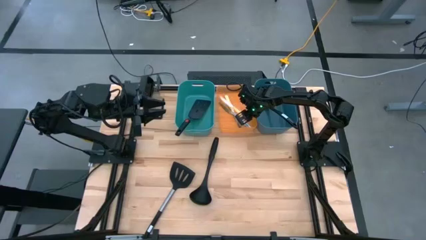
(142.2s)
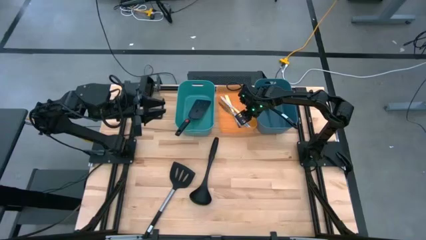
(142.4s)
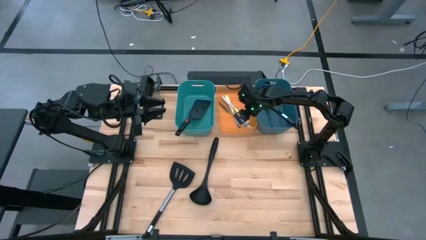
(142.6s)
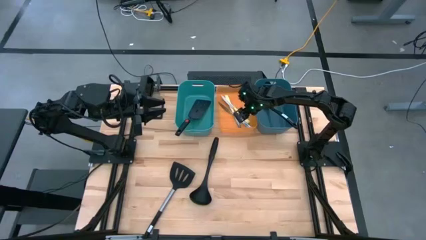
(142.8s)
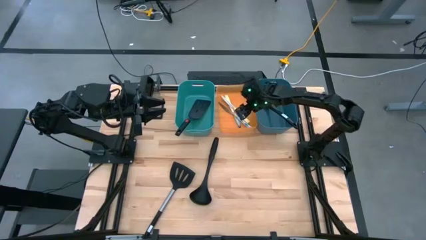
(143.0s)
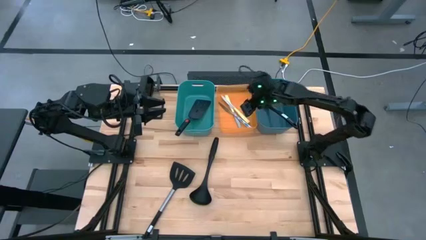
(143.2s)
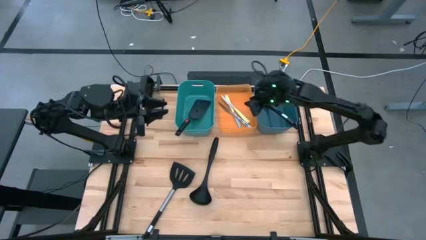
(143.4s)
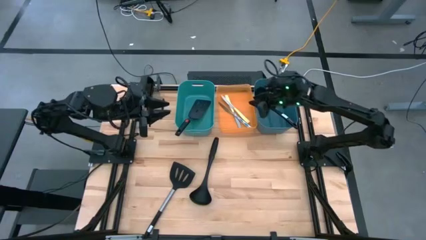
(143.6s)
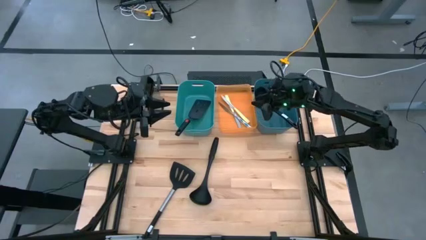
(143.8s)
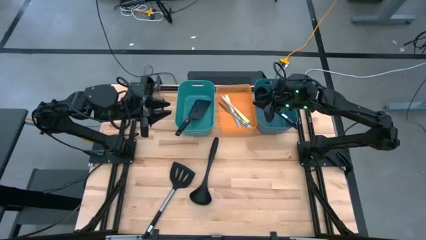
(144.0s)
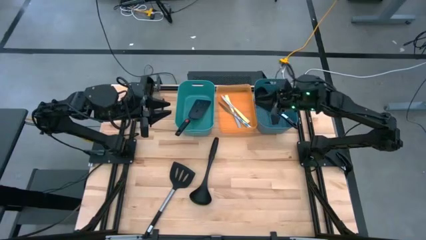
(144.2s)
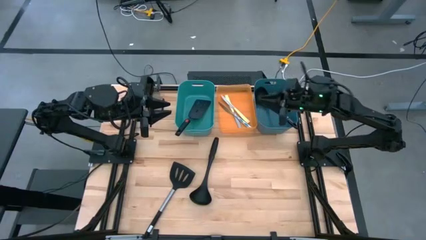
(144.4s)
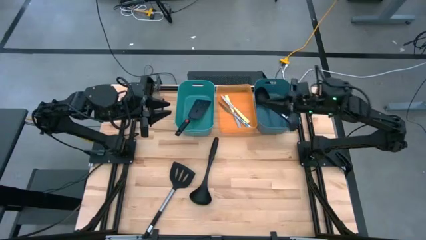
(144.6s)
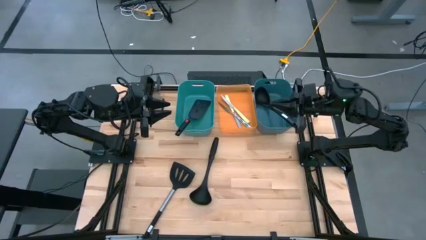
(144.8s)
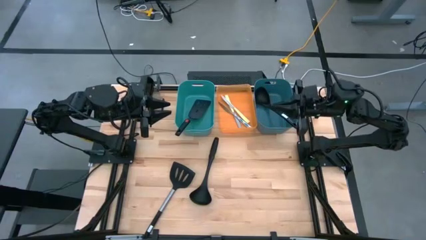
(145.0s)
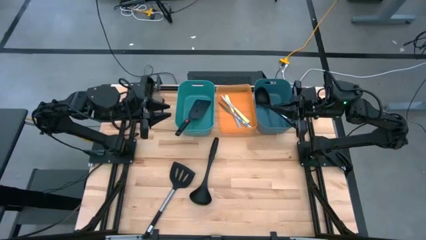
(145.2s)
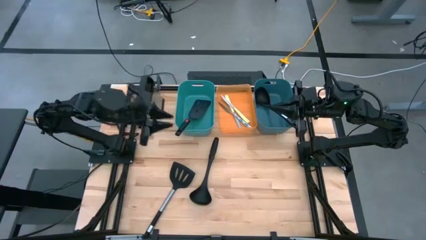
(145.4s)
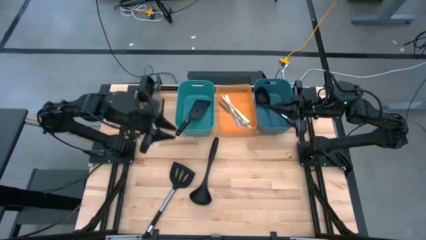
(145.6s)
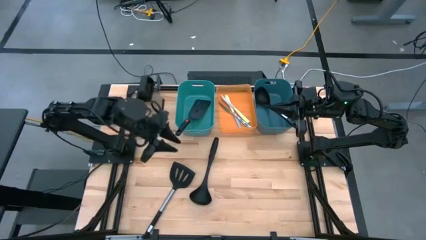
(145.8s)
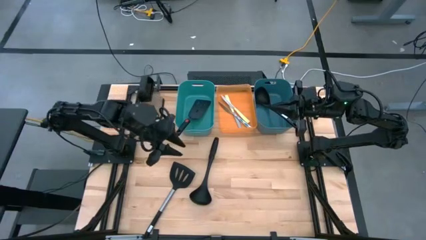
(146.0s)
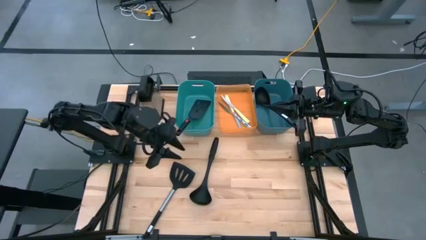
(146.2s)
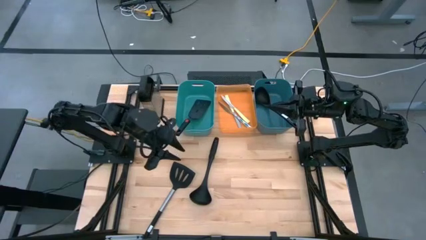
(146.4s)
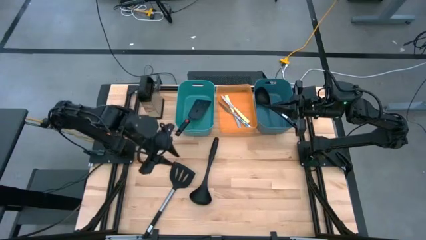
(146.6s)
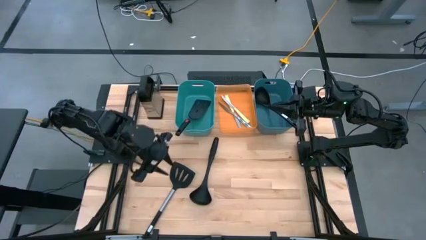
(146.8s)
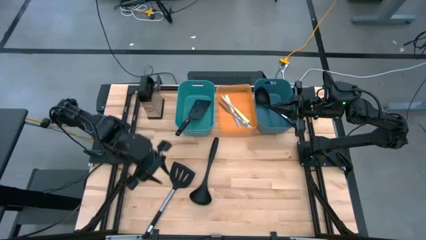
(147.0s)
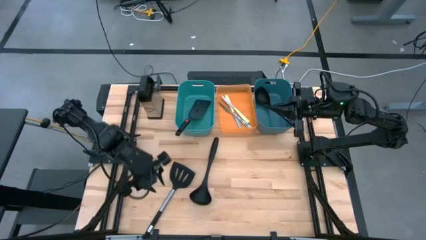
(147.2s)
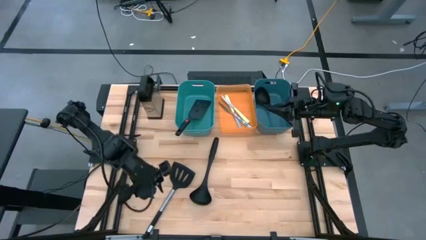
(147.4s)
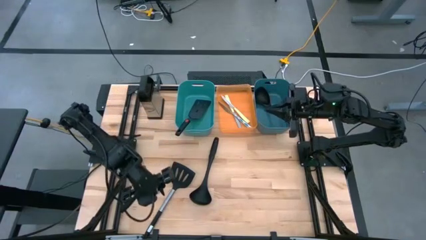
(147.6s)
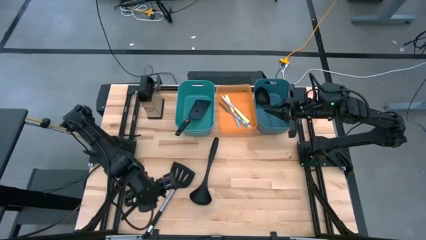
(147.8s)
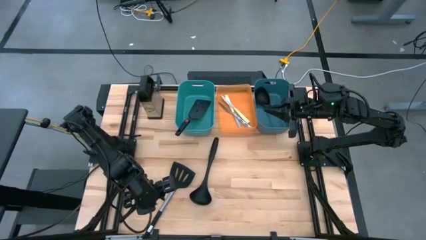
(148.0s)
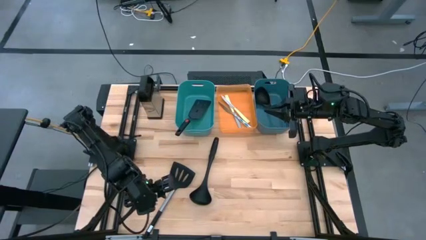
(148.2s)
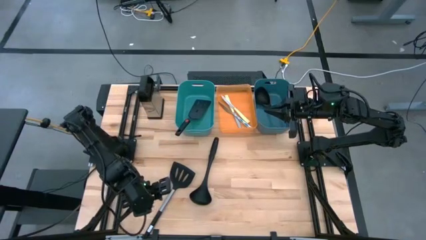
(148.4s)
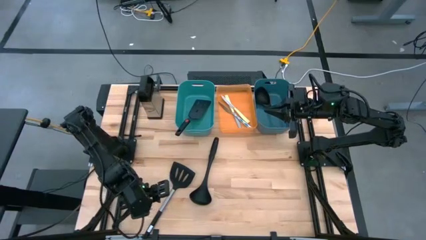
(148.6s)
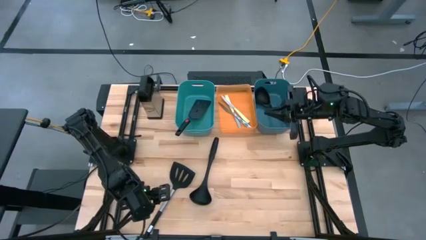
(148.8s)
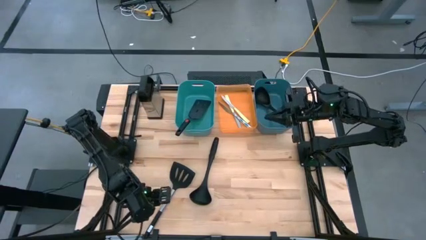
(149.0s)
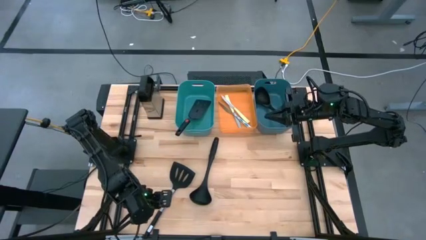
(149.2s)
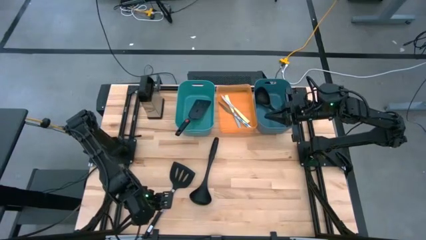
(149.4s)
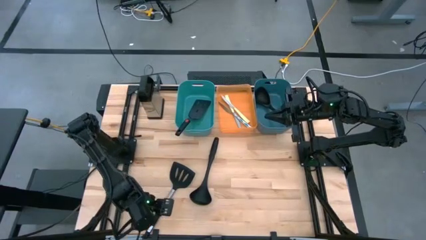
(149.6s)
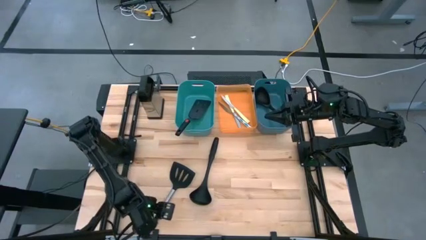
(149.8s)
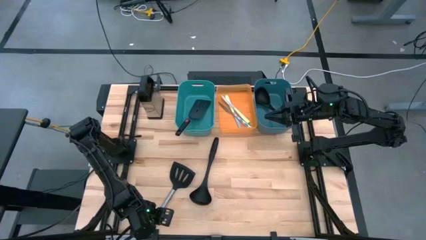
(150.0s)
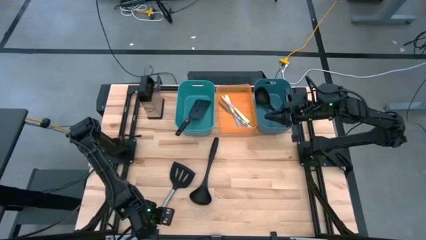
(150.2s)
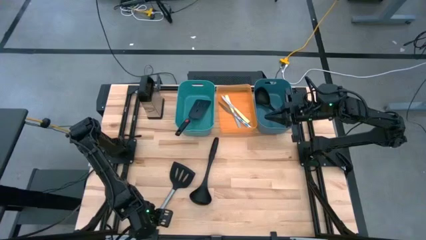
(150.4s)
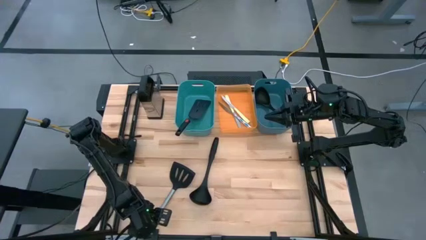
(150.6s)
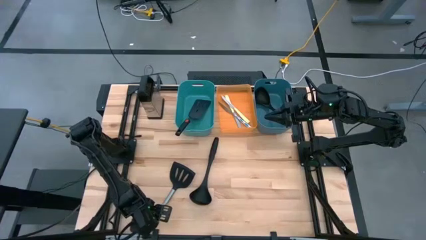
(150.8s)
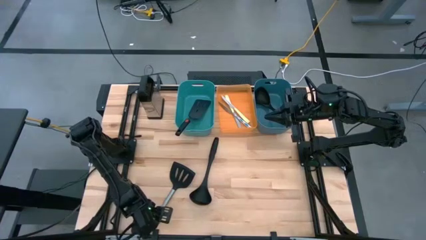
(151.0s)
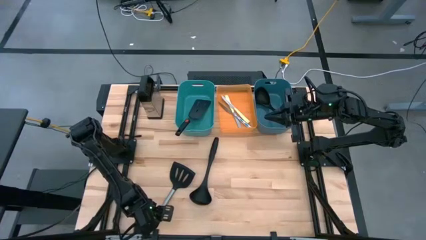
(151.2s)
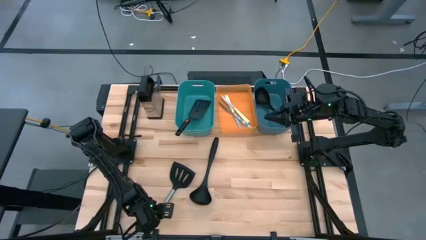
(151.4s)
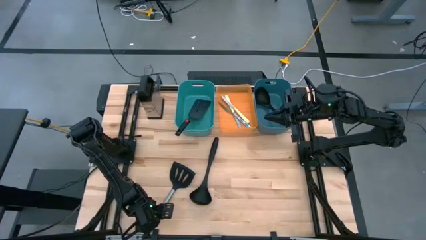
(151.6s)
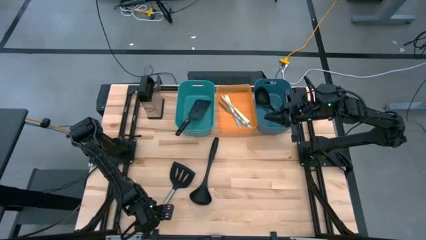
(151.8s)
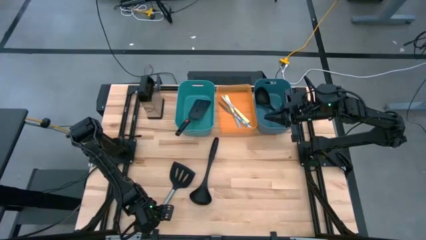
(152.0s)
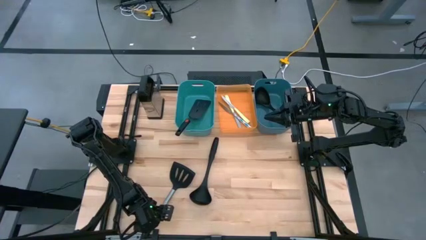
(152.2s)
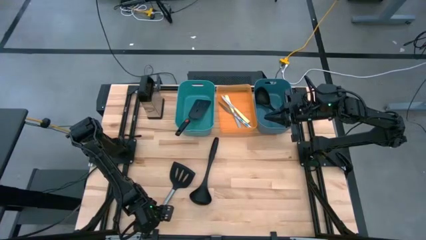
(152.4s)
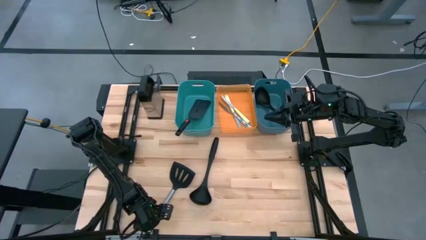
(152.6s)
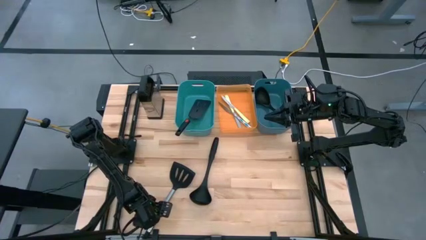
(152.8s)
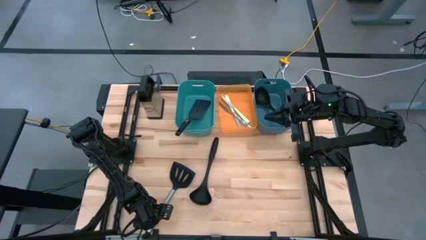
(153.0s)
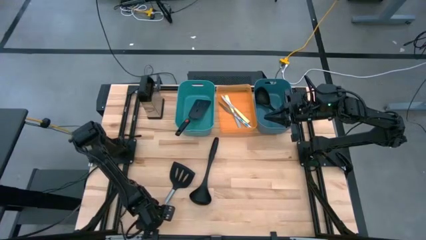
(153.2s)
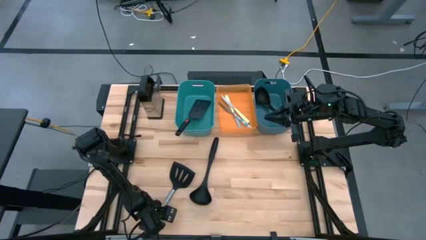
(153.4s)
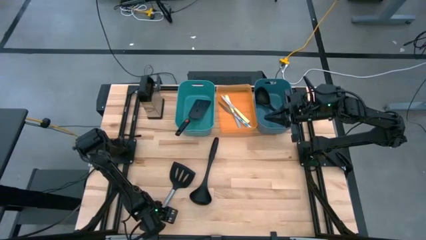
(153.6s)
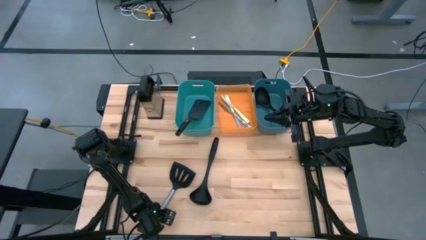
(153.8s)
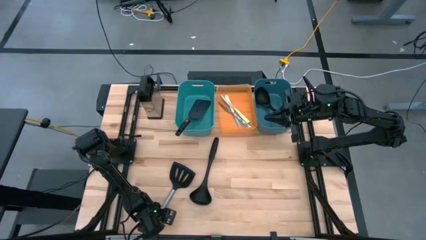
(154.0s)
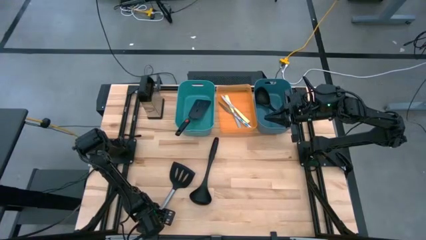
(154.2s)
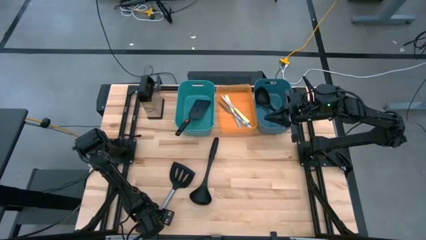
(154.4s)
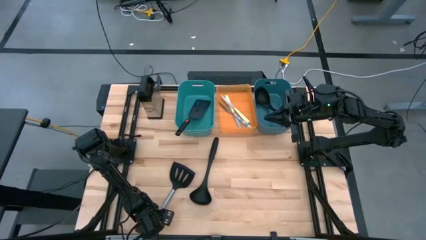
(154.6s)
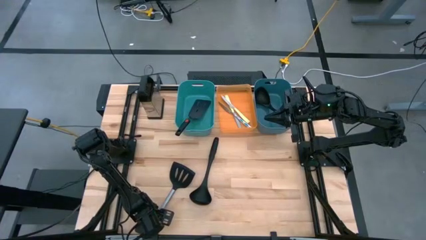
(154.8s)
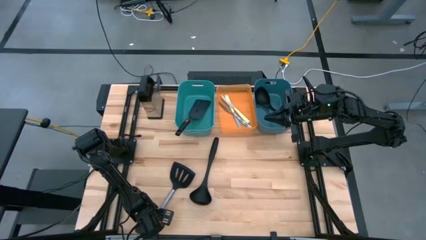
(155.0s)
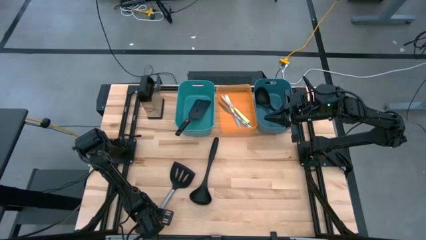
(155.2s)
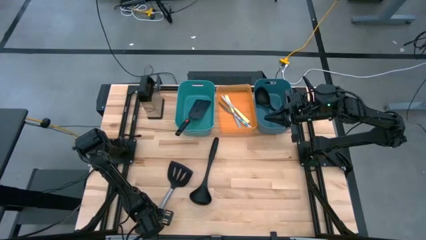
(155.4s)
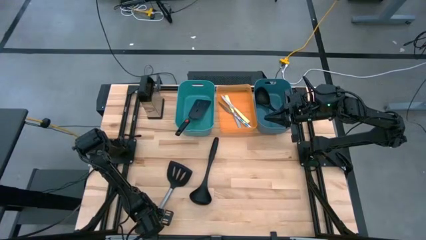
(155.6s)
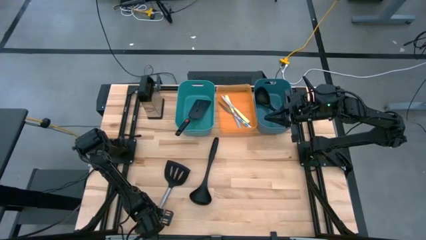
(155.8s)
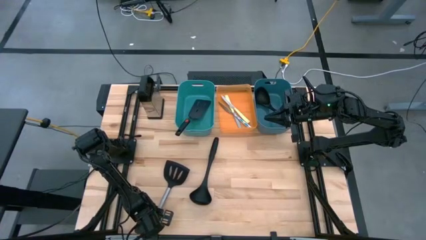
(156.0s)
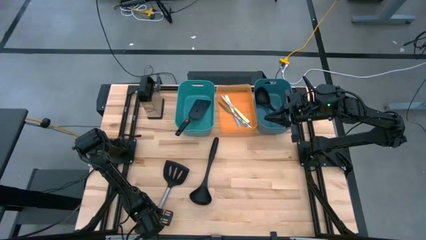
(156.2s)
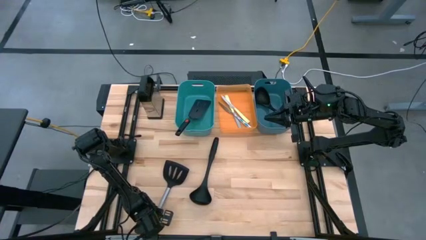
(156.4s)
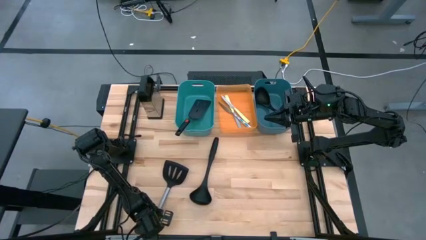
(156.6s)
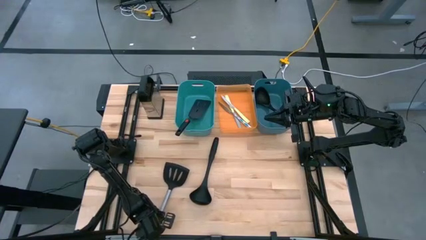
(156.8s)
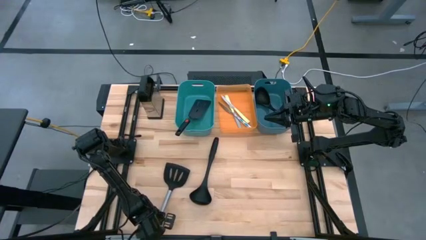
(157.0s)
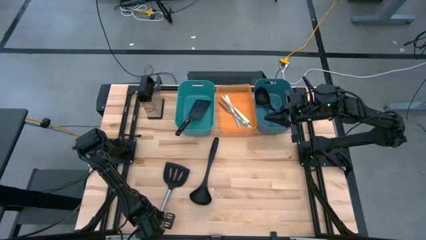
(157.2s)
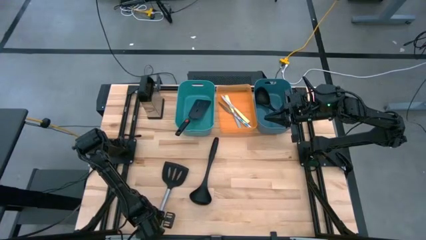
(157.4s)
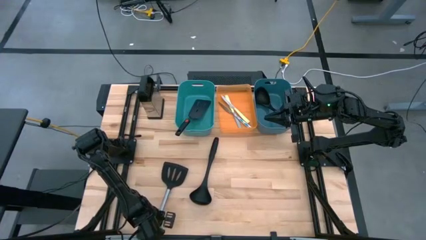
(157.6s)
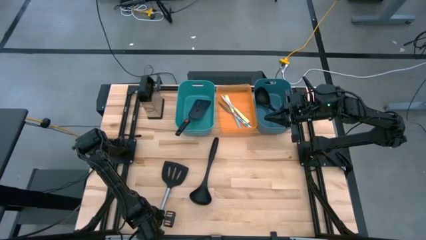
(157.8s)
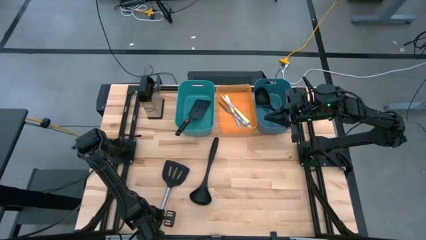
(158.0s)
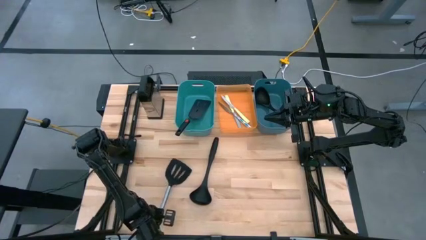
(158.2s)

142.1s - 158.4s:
Task: Pick & Place Kitchen Items
Put the black spatula into the green bin
